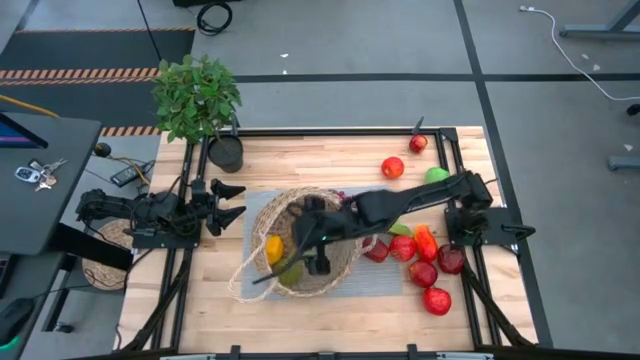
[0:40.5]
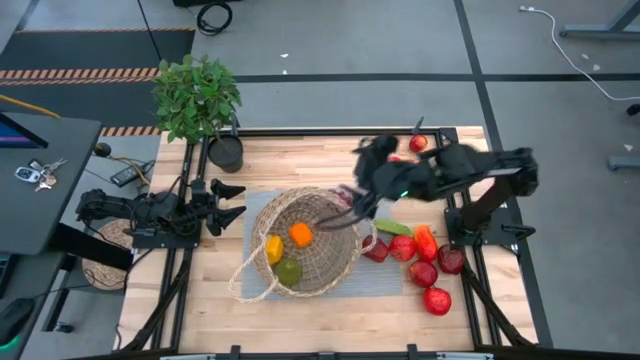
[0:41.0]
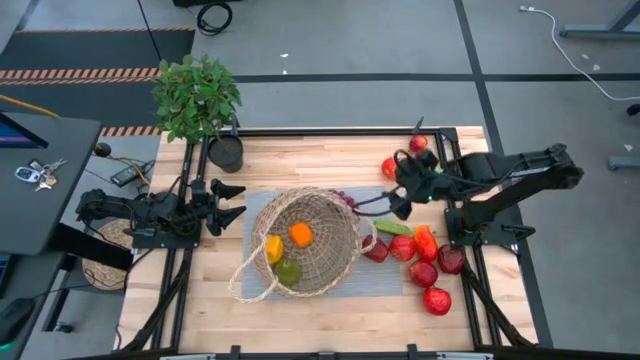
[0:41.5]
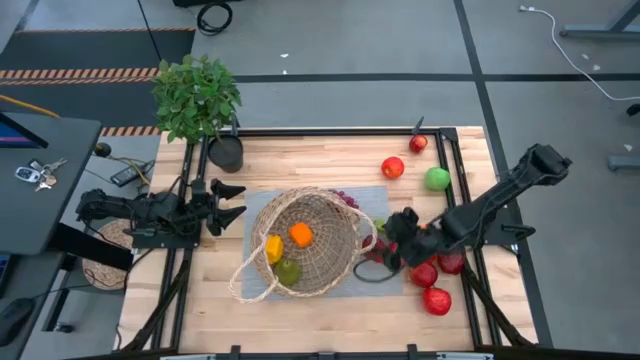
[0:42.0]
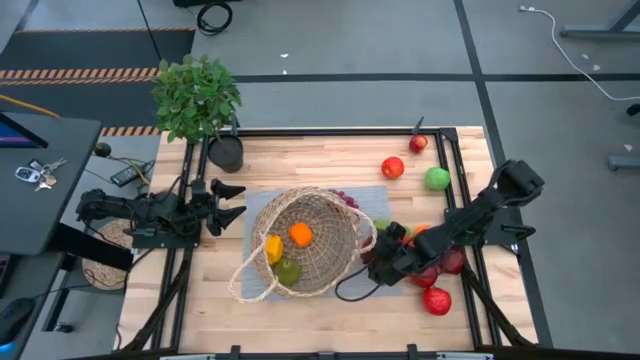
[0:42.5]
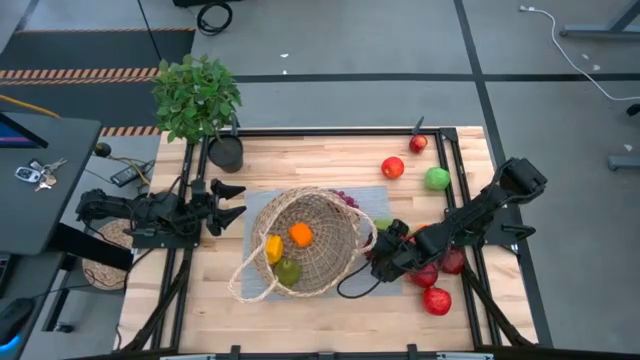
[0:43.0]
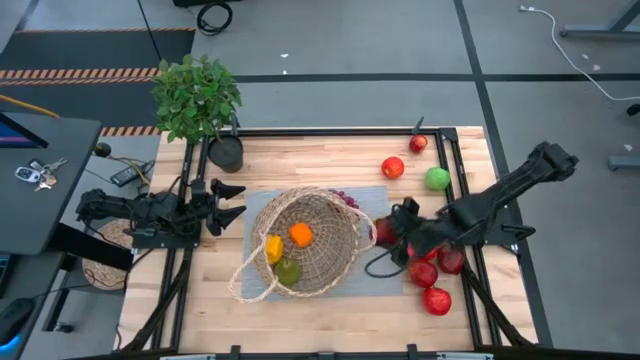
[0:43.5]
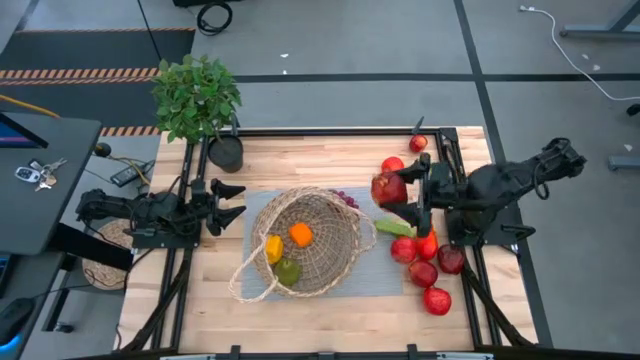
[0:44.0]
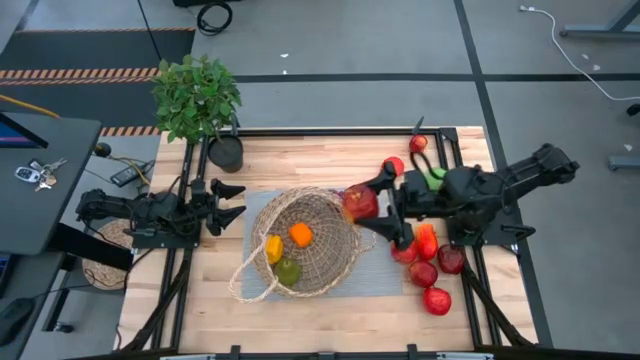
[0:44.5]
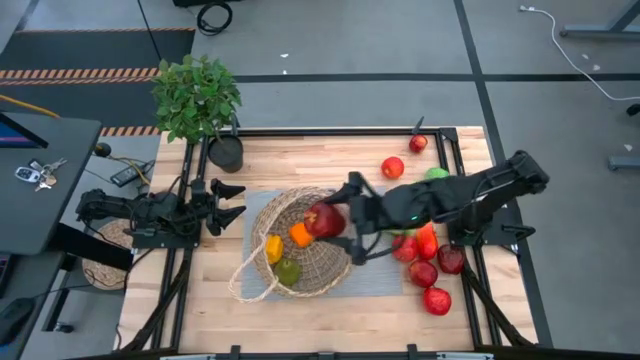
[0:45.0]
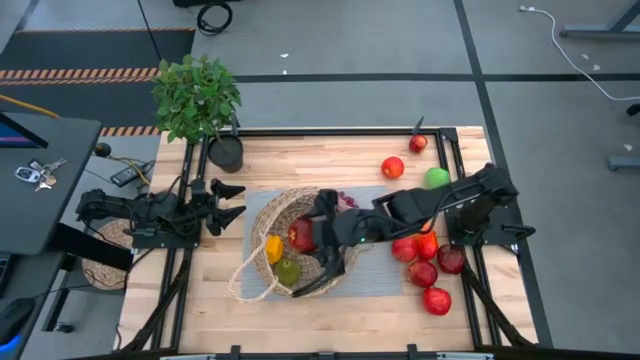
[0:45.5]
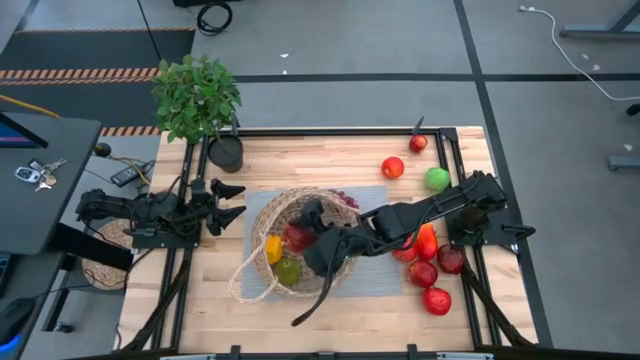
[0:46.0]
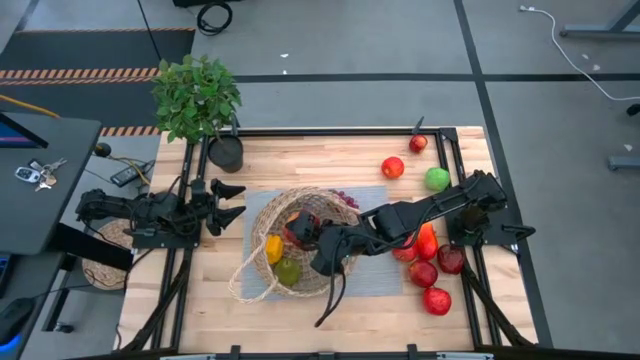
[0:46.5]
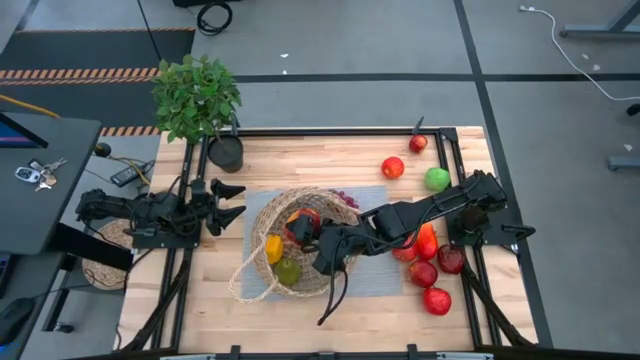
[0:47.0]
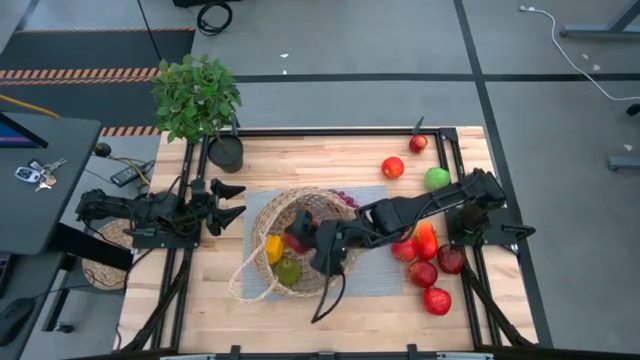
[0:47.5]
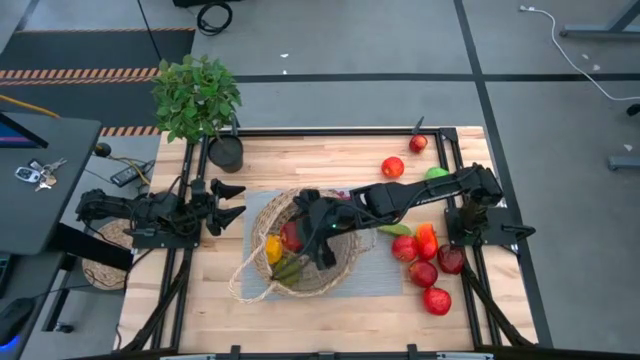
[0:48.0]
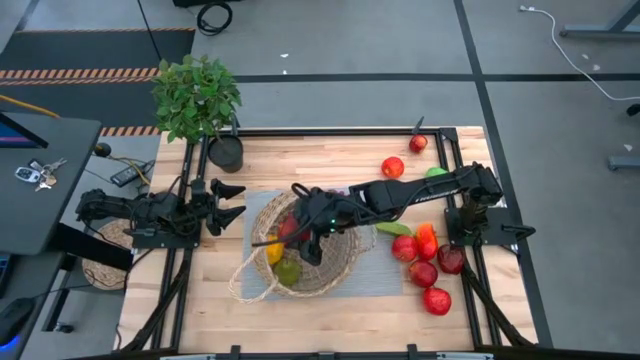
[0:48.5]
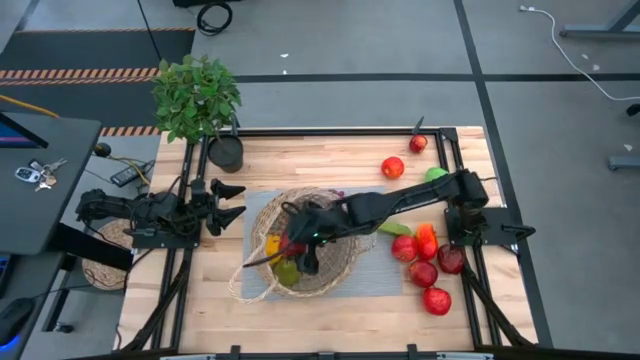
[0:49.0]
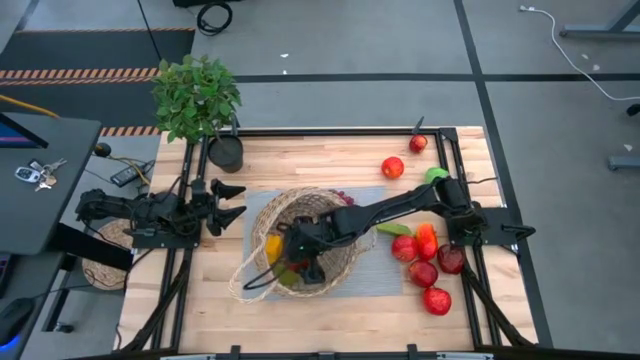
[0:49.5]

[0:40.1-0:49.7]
Task: Build produce basket
Put the dark red apple into the brown basket

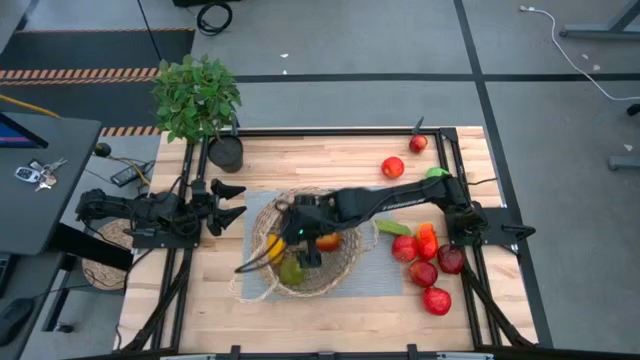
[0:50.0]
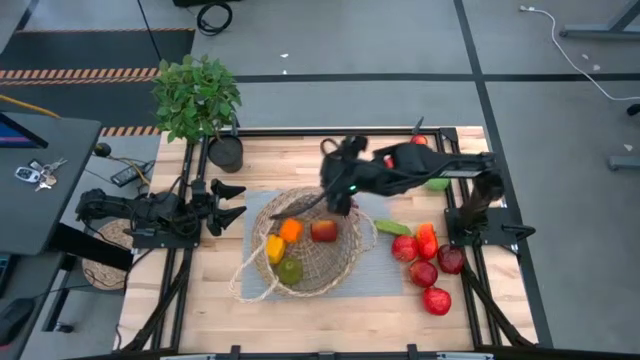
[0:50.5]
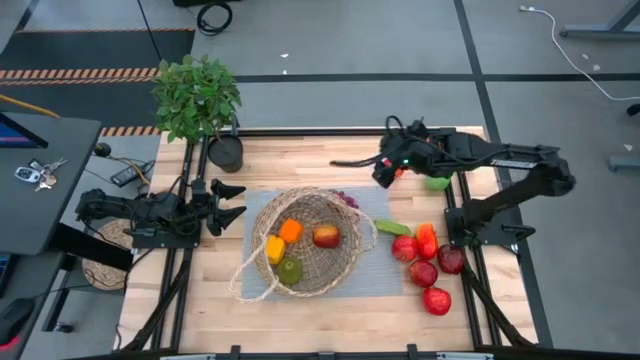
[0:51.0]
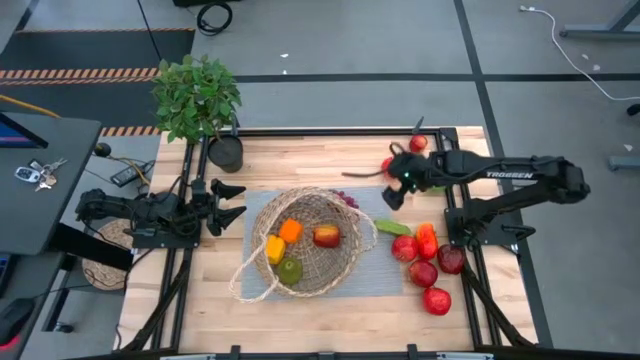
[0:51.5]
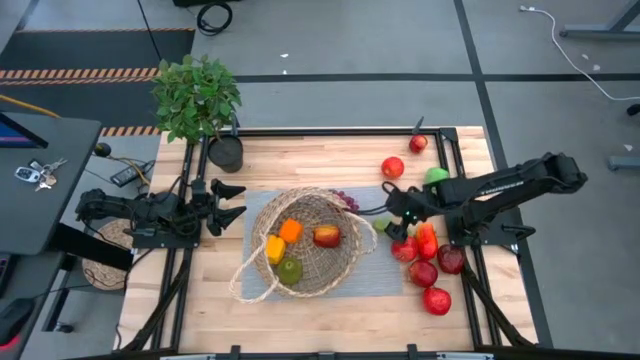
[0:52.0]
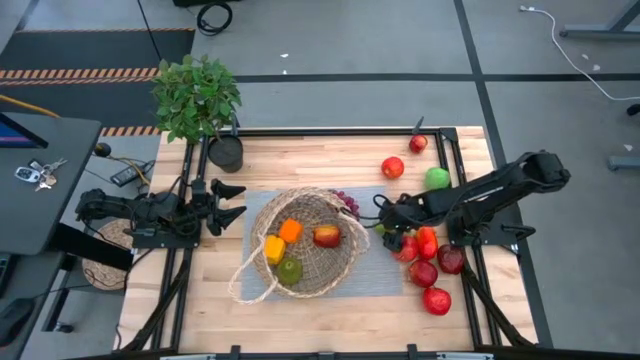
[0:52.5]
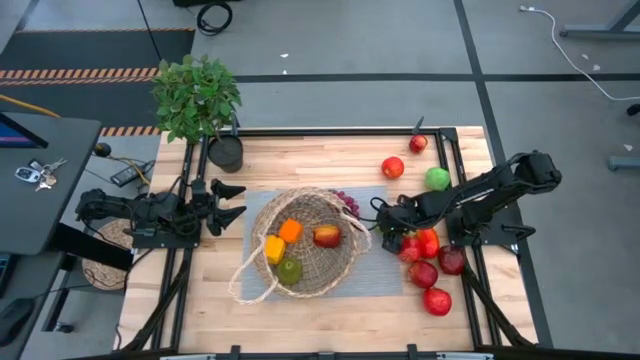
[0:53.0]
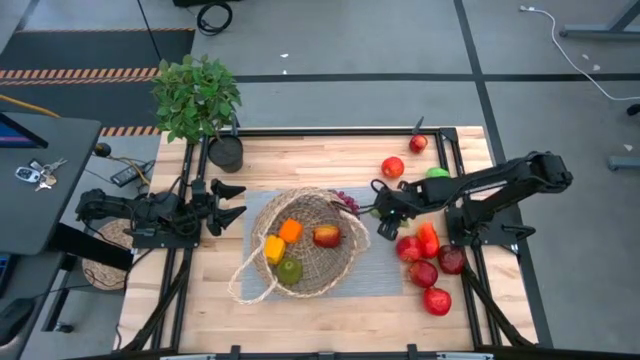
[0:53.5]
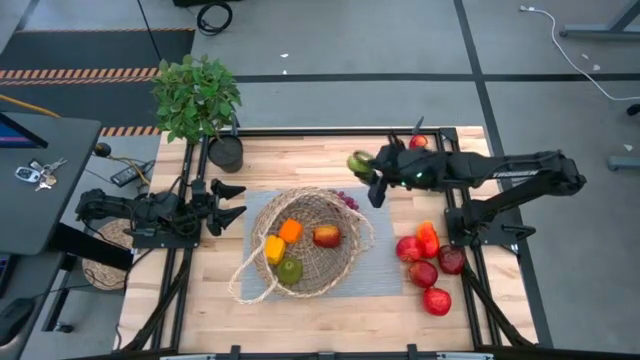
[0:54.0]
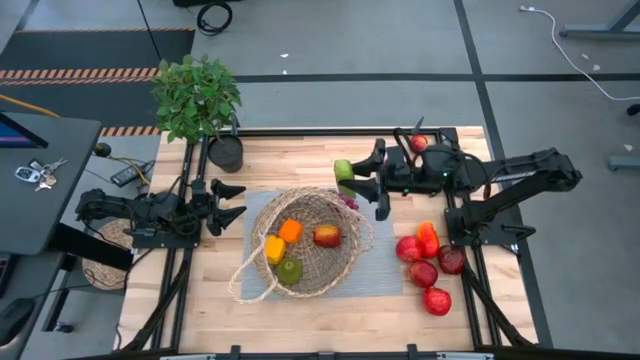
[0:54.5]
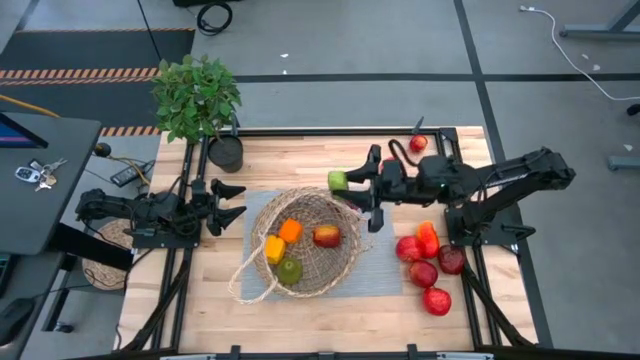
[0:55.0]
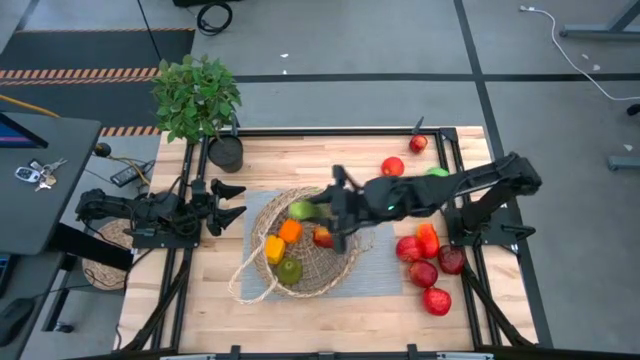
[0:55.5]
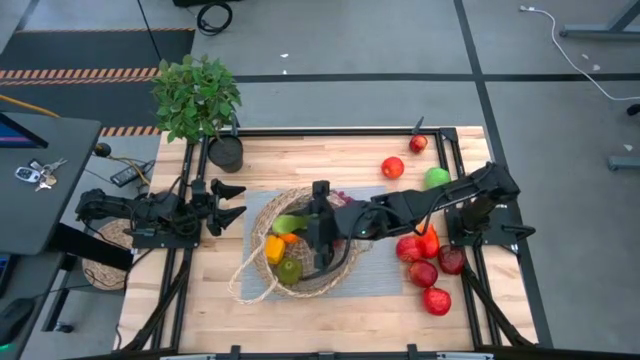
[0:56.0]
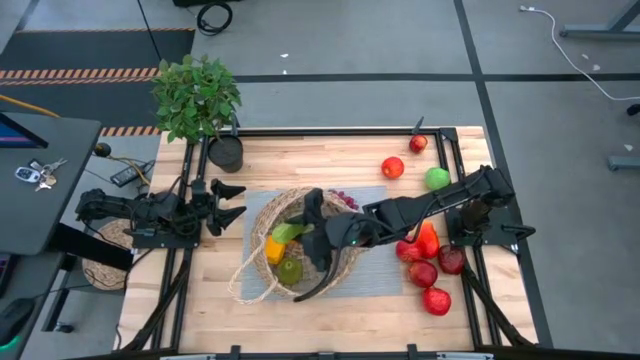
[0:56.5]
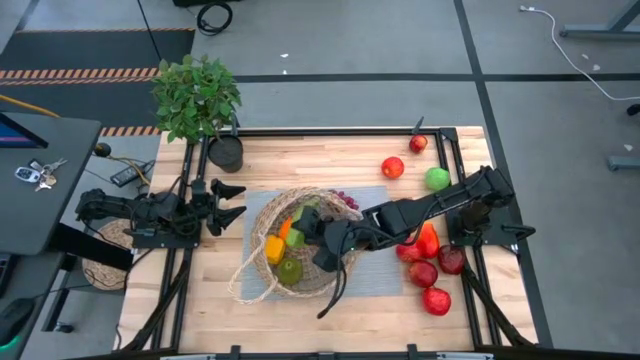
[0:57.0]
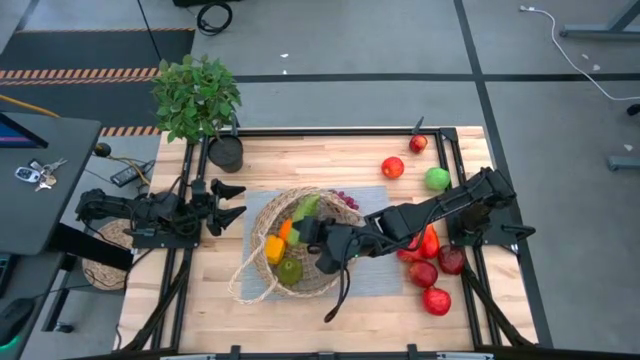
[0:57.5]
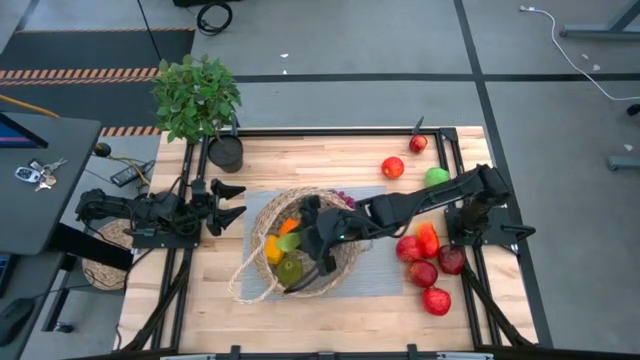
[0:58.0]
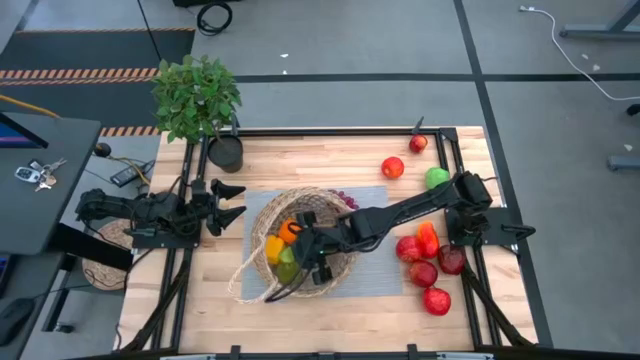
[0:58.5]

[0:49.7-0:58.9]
Put the green cucumber into the brown basket
